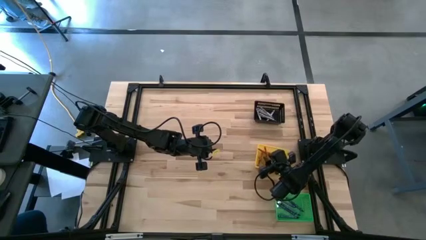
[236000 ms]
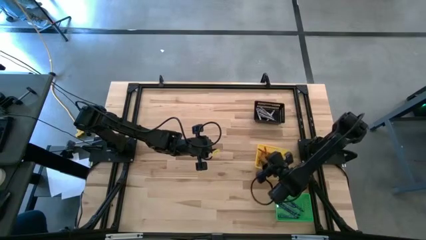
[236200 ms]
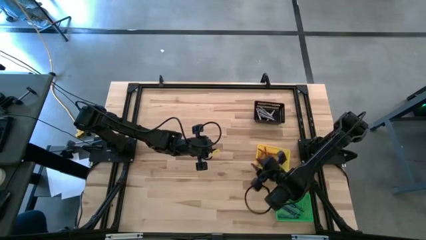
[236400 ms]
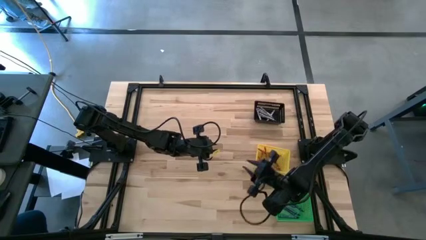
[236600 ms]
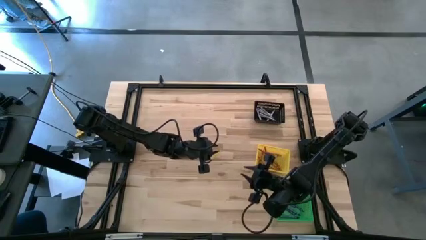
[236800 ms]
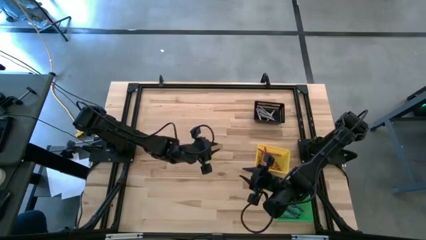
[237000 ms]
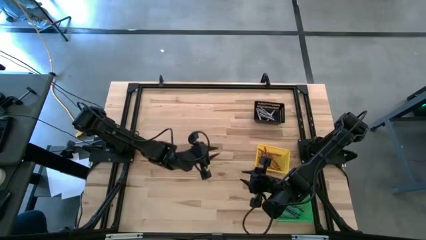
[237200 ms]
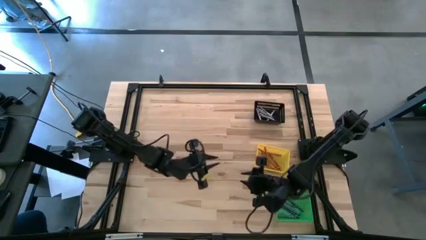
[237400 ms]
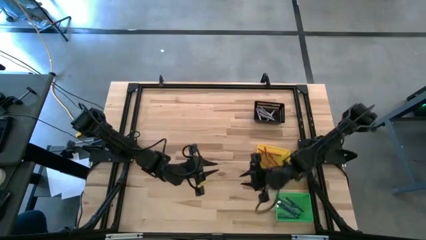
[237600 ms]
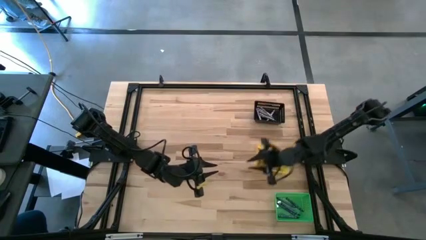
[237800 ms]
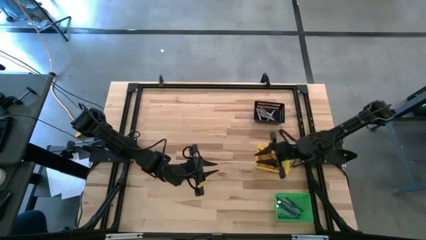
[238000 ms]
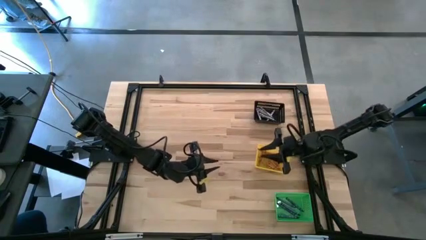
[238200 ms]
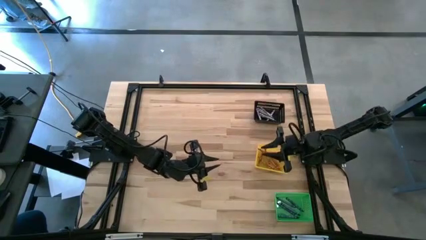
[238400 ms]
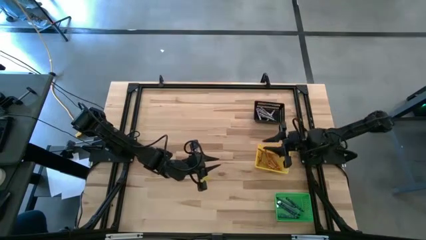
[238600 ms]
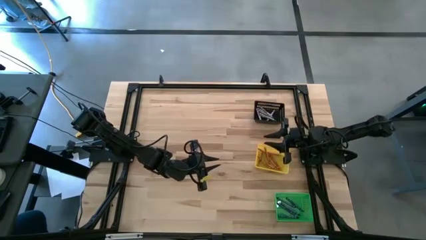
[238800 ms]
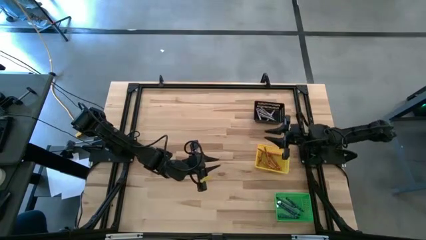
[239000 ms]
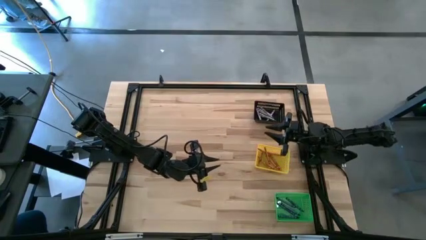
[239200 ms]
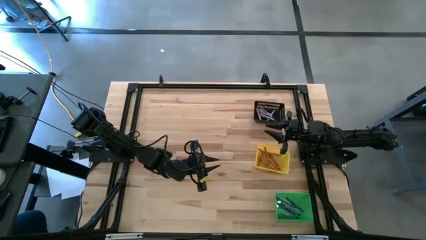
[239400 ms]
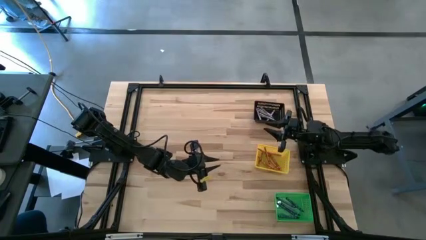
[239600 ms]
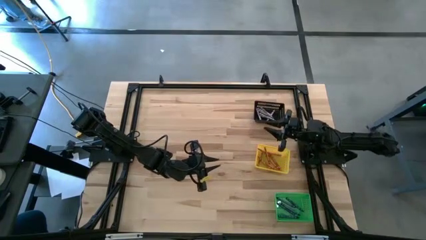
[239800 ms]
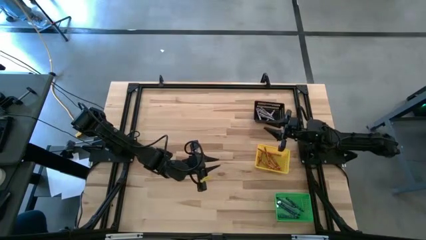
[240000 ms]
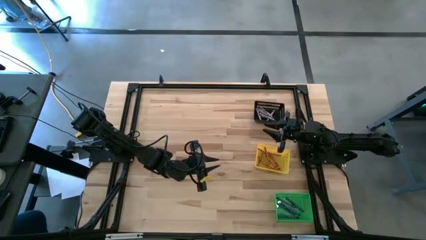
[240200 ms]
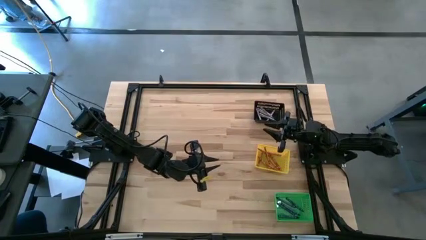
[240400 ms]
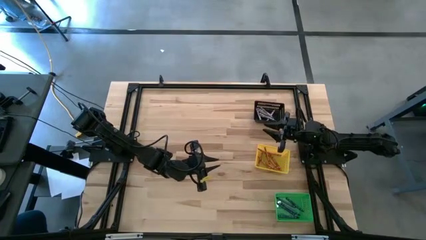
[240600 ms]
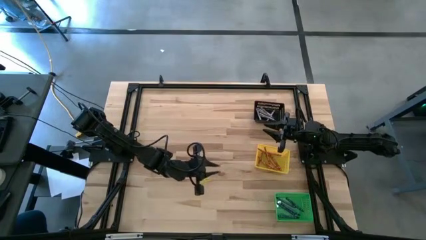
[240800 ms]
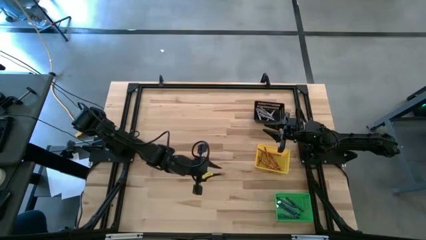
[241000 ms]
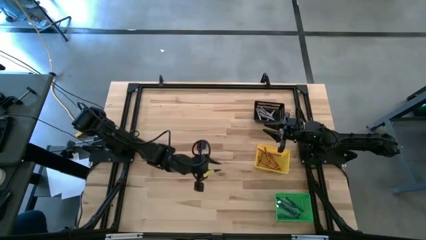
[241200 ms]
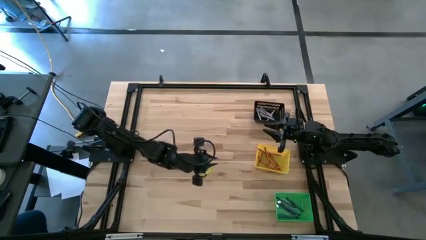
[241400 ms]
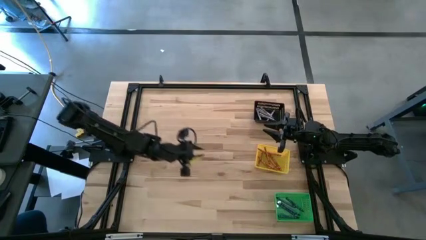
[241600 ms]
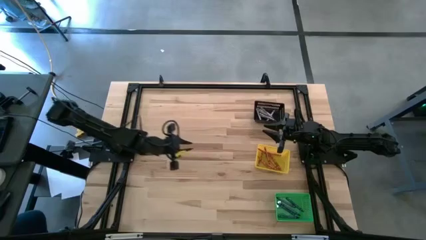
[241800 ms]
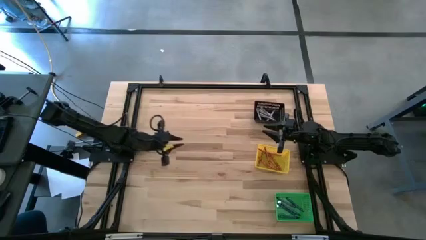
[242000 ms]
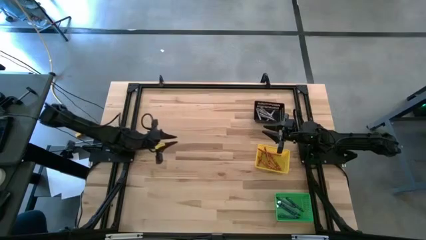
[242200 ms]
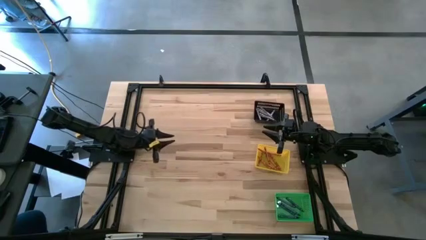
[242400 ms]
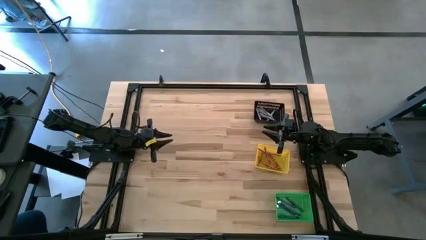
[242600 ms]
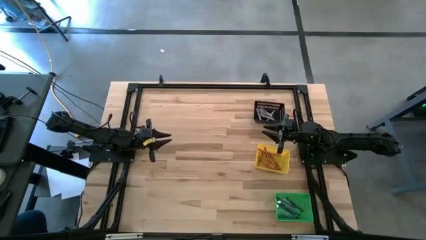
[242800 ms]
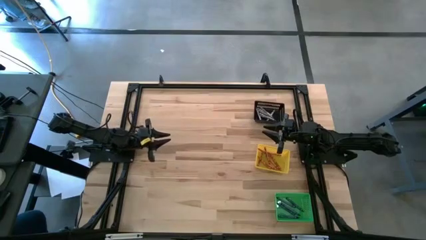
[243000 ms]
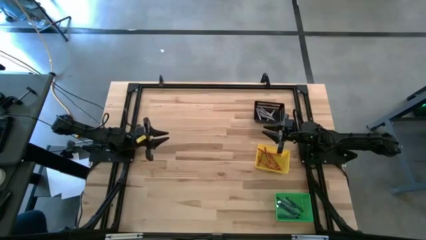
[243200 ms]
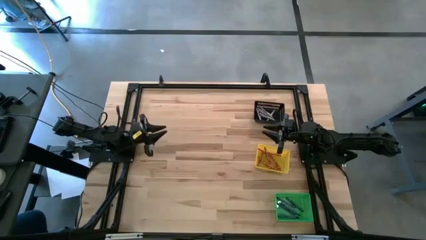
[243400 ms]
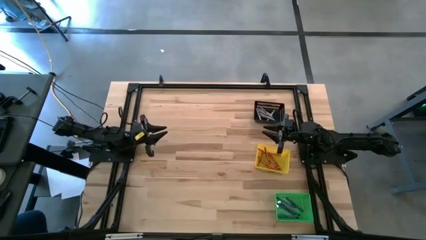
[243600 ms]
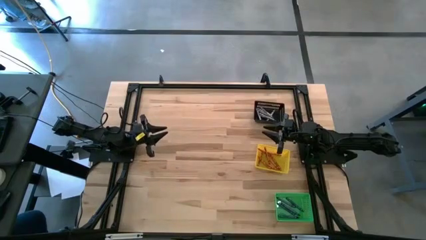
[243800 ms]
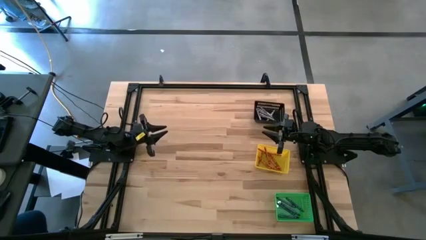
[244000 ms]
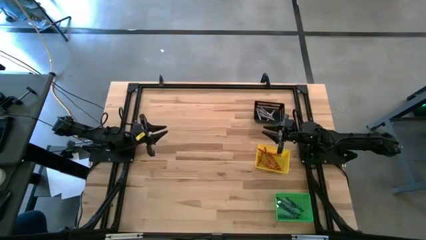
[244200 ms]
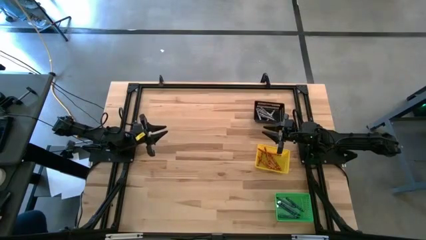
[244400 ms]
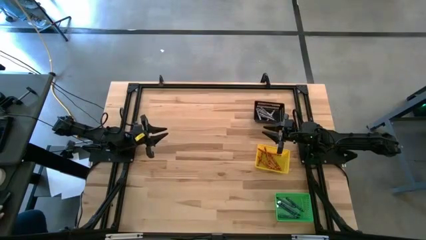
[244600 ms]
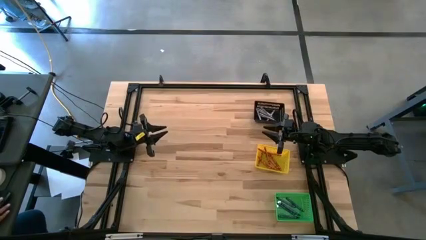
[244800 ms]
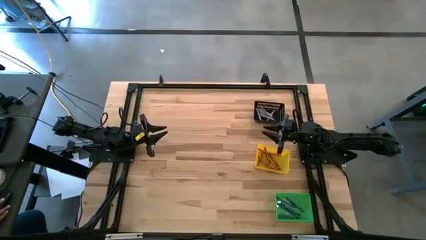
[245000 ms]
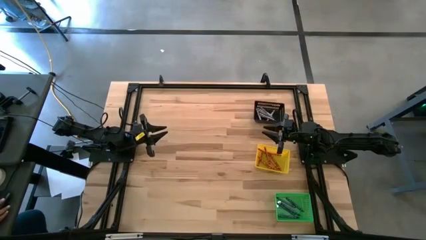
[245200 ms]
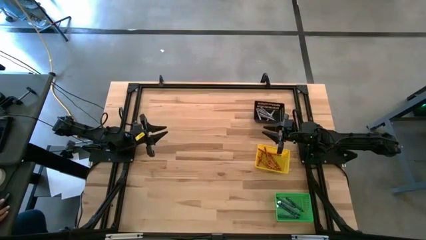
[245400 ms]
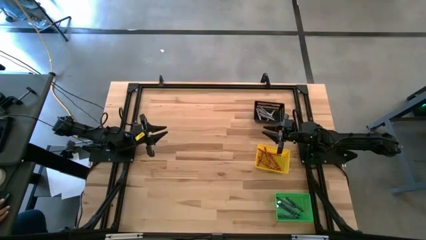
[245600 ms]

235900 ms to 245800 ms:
Task: Sort crayons
Return to Home Position

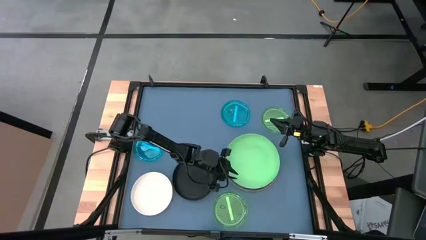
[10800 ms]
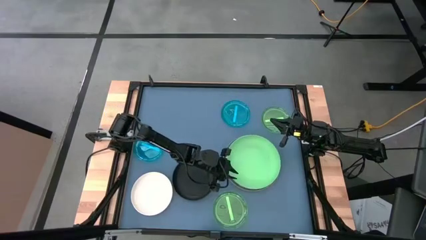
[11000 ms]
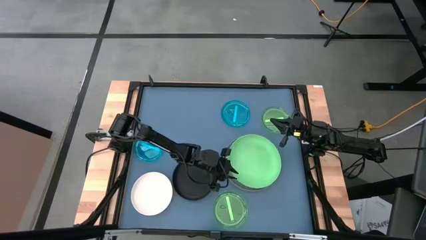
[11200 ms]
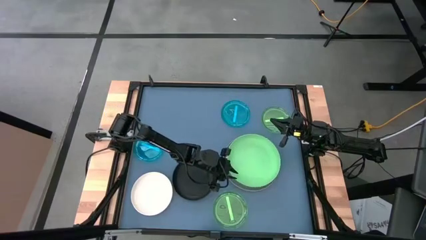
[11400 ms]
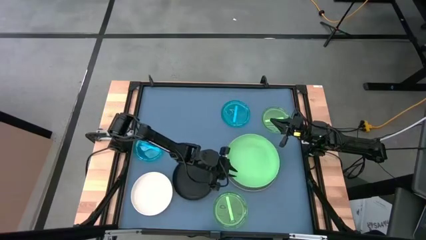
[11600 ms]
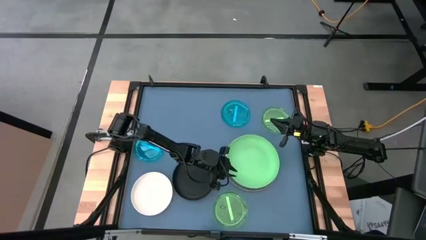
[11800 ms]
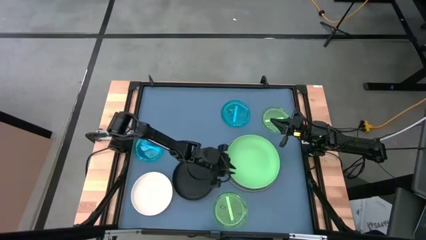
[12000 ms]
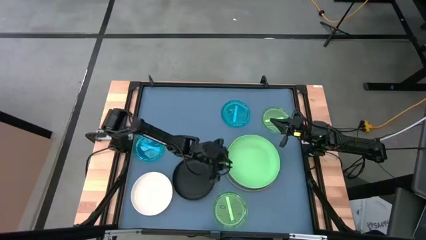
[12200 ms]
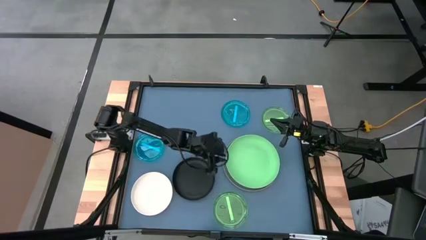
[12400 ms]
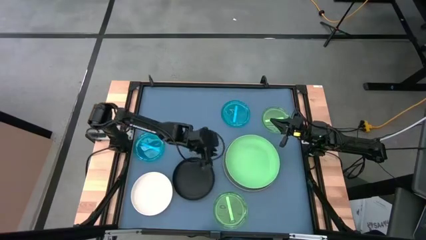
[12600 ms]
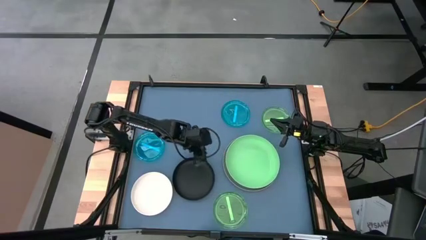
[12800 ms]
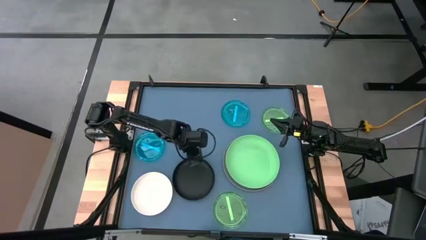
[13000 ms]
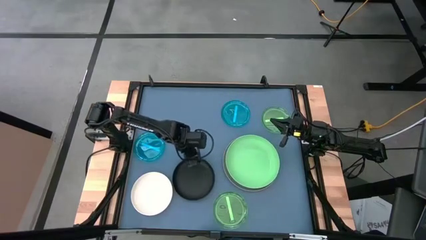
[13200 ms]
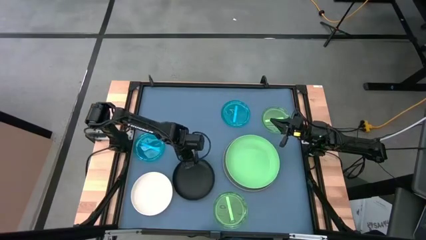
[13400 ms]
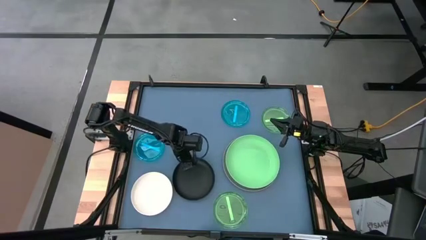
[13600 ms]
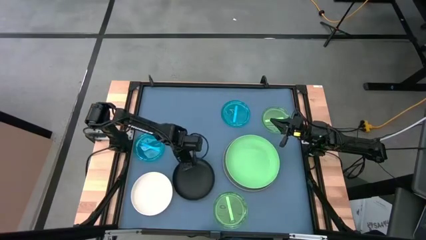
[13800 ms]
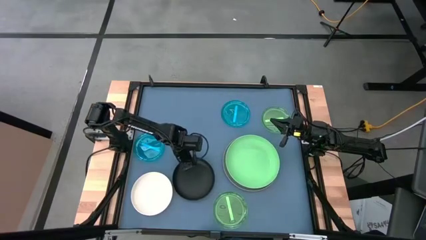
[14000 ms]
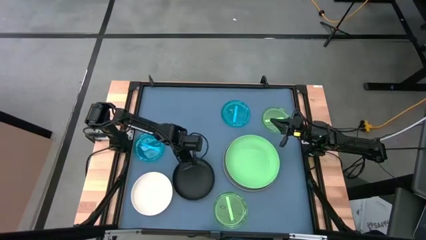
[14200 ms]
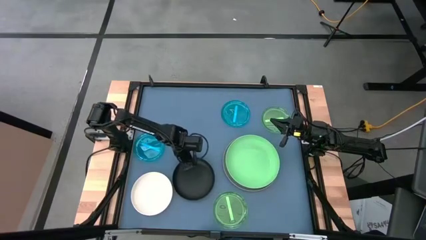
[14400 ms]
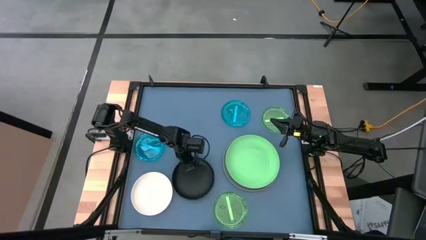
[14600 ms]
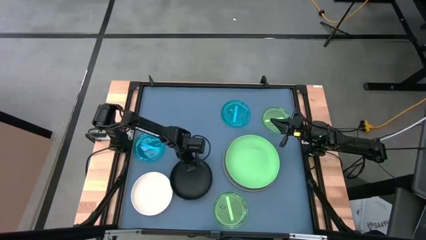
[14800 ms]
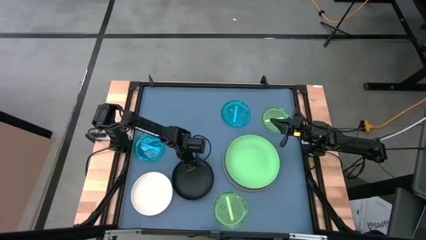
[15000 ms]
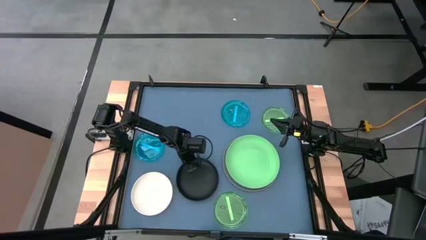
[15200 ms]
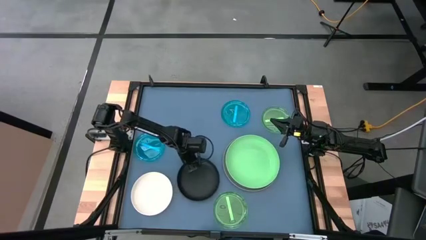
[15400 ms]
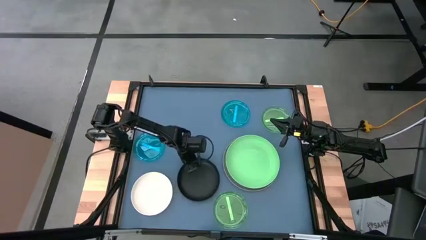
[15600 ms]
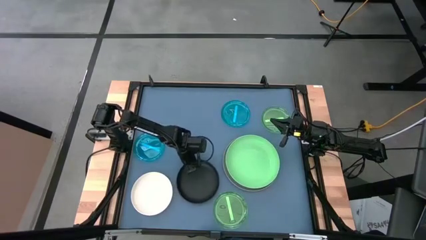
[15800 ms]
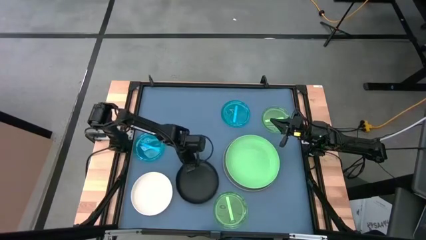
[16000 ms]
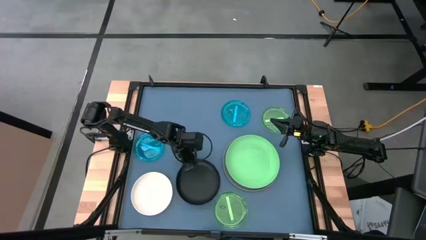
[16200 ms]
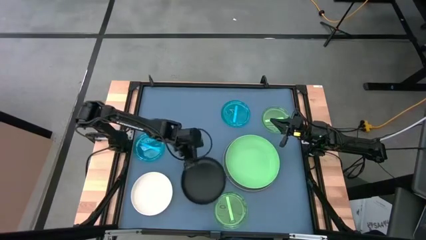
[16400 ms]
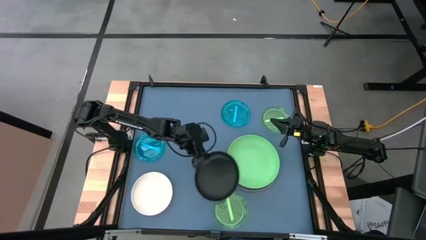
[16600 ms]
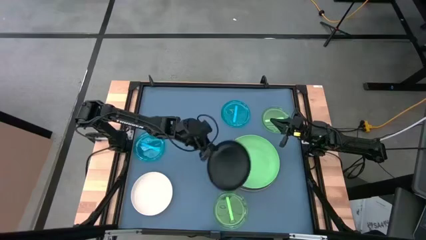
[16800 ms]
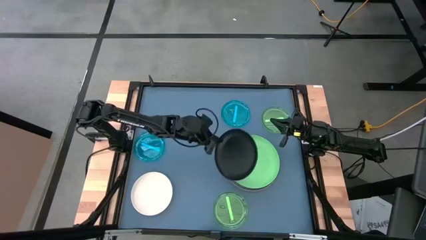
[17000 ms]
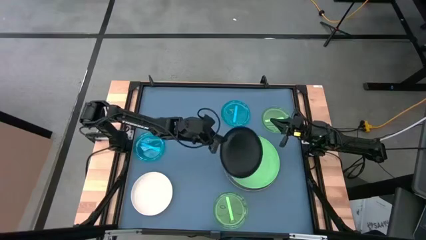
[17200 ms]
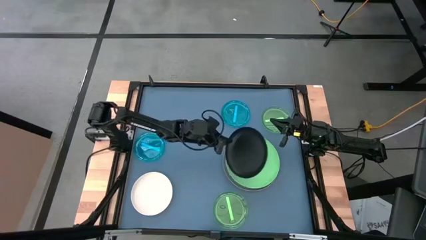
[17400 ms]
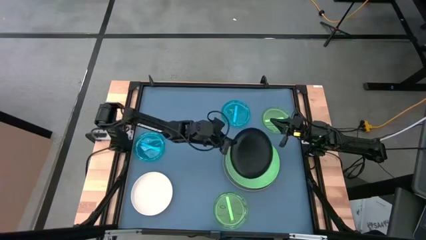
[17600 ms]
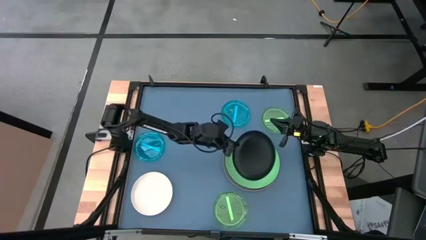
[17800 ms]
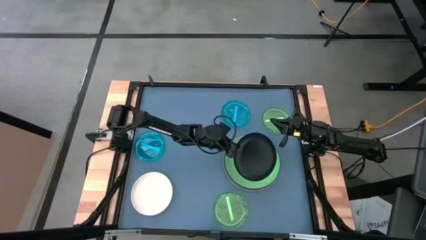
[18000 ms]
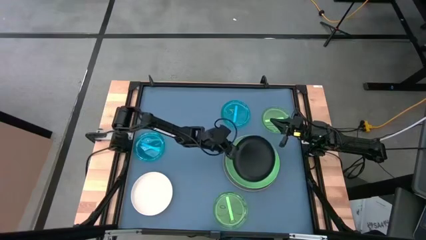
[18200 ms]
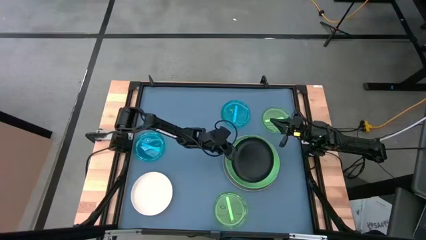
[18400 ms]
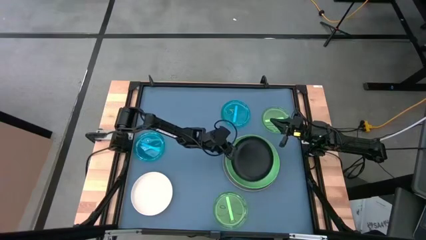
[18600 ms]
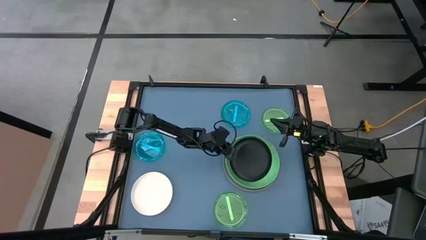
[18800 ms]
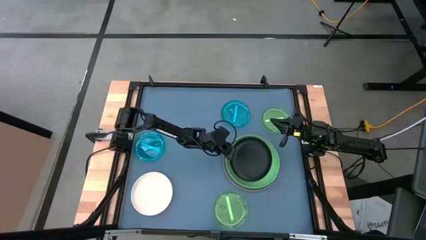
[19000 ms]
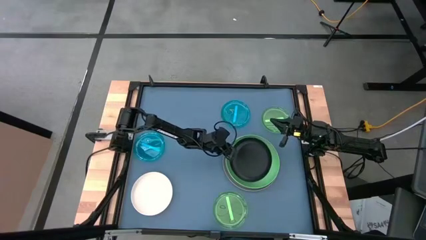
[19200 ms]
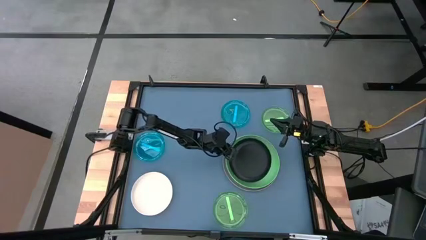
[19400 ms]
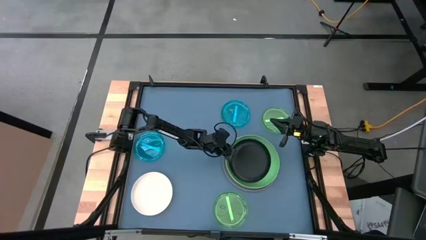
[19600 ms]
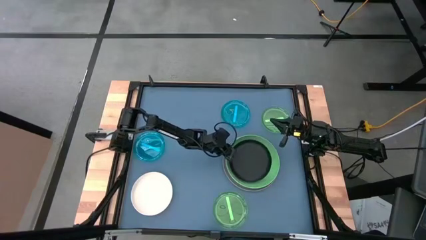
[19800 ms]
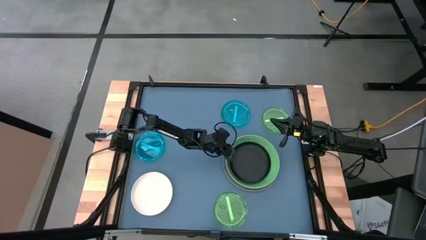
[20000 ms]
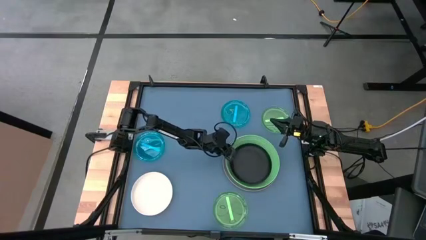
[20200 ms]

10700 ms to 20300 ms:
Task: Stack plastic plates
Stack the black plate on top of the green plate
